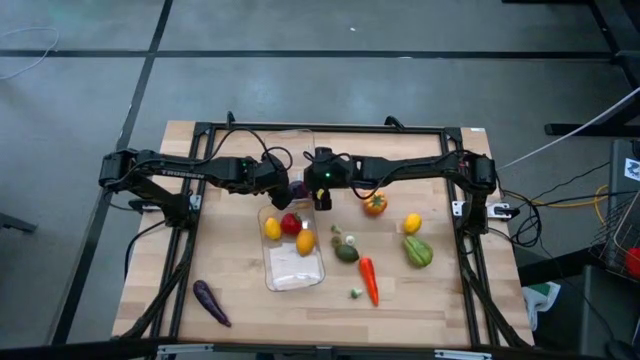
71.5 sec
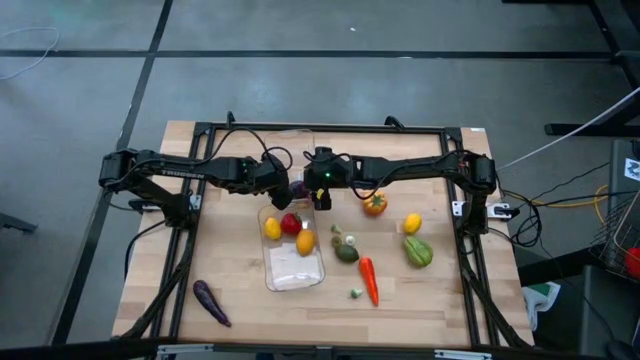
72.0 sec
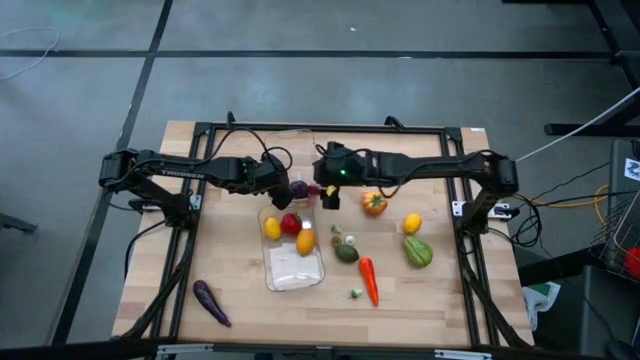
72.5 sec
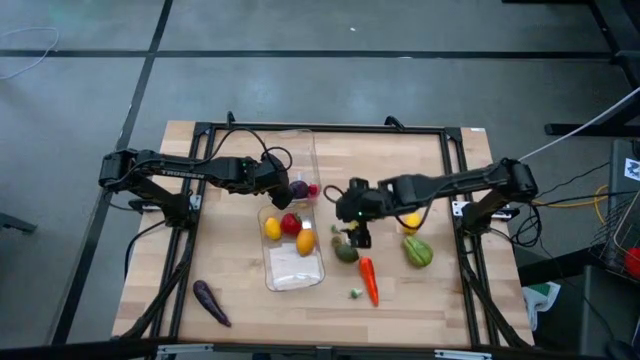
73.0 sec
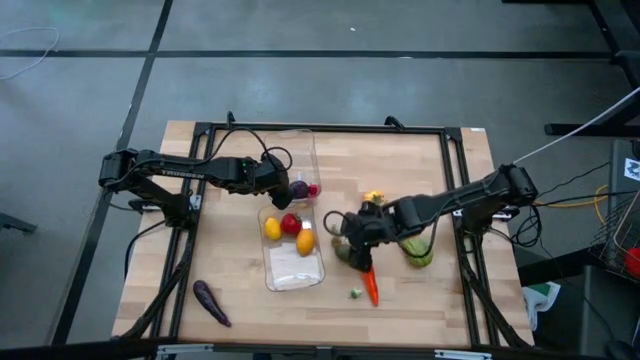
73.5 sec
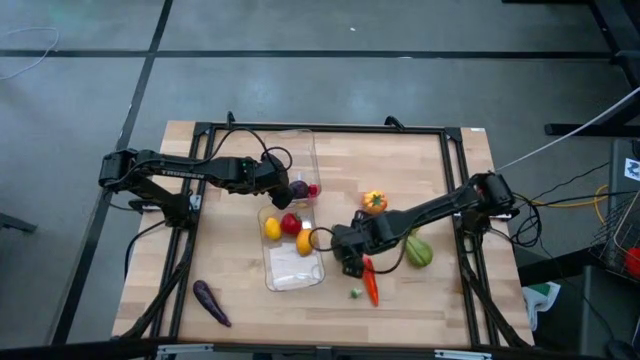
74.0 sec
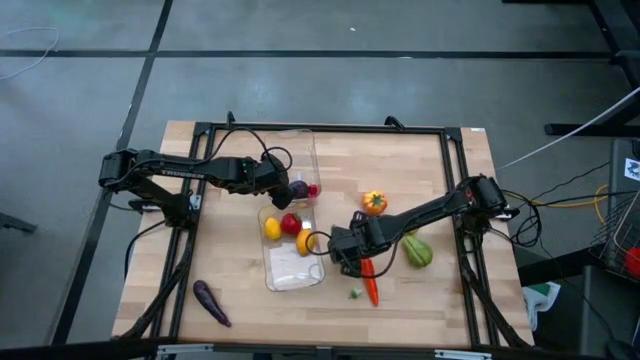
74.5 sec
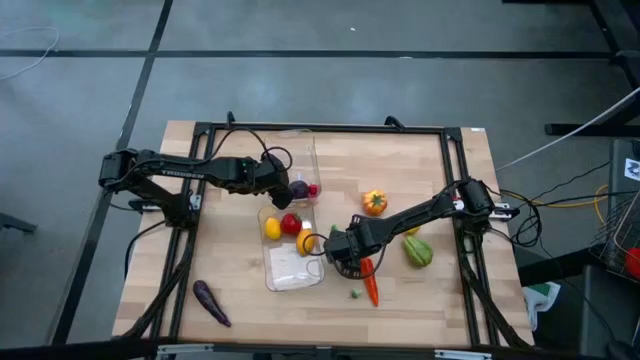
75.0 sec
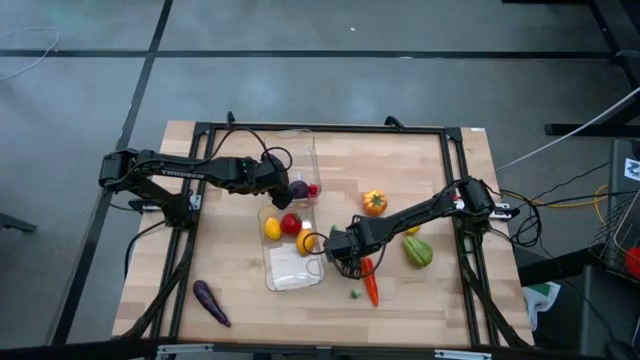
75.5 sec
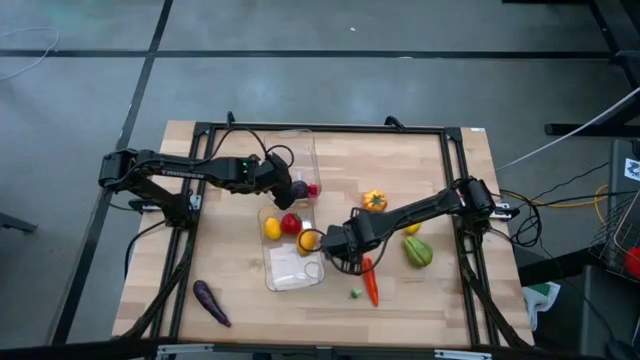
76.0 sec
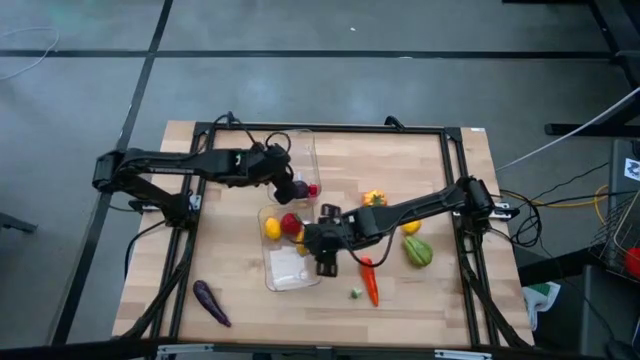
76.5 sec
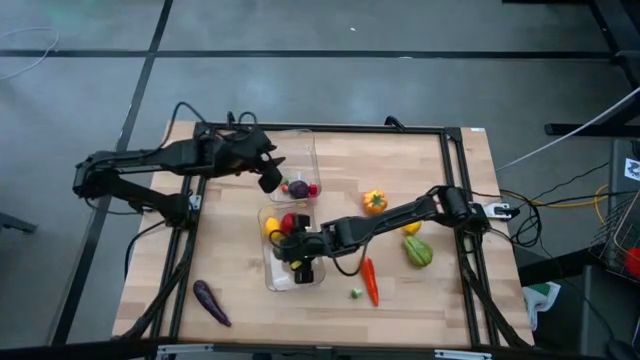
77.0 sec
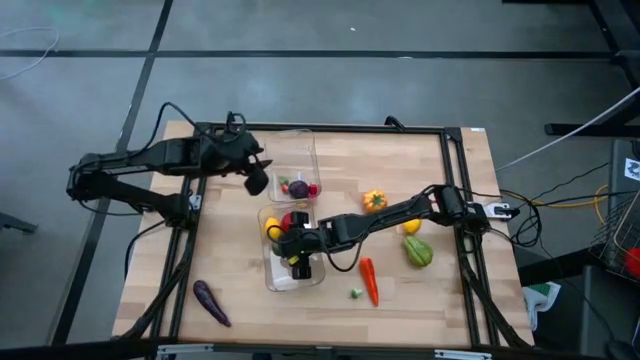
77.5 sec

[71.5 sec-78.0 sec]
Task: Sort produce into baskets
Put the green lime into the bottom transparent bin

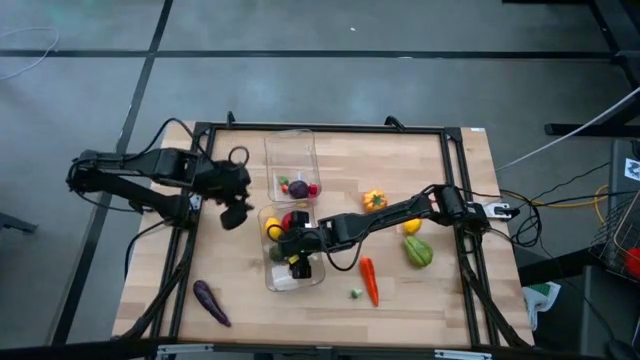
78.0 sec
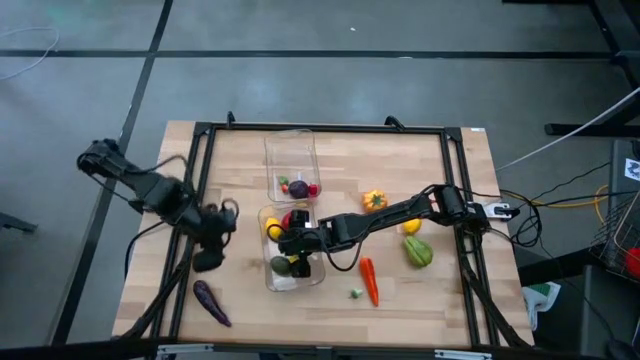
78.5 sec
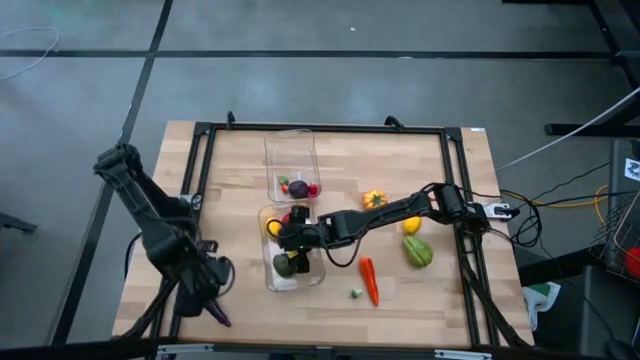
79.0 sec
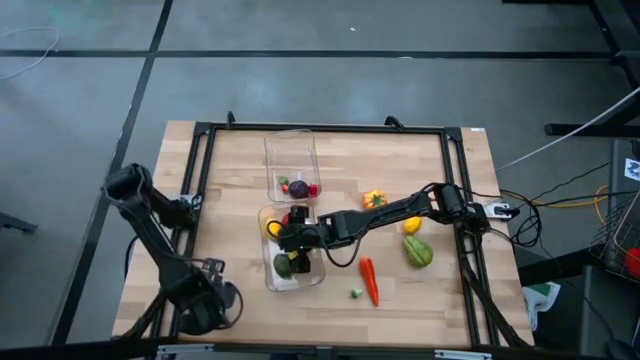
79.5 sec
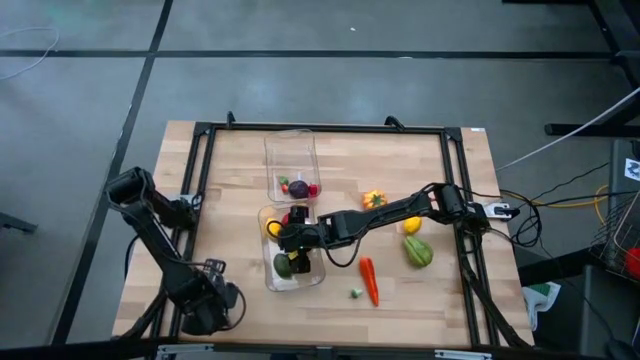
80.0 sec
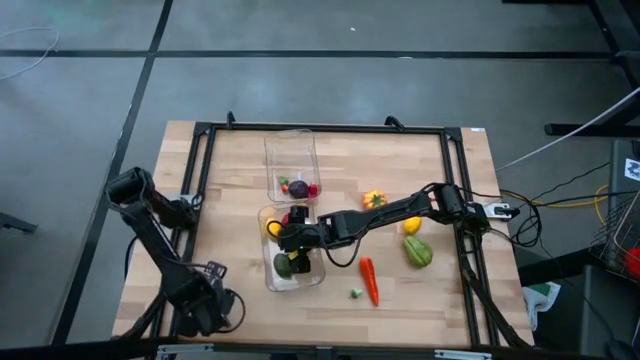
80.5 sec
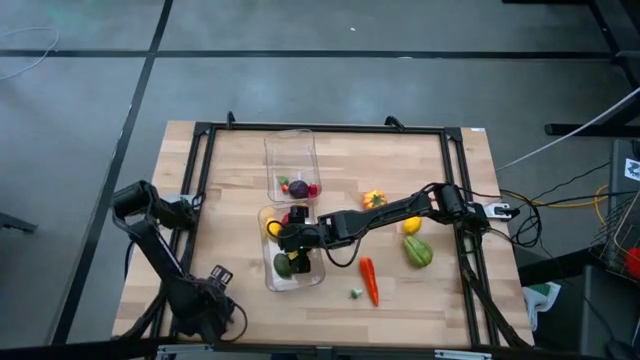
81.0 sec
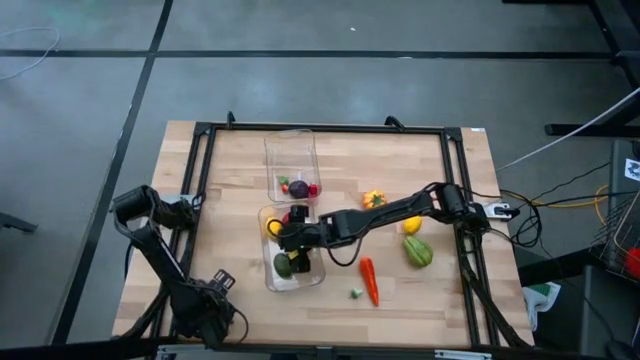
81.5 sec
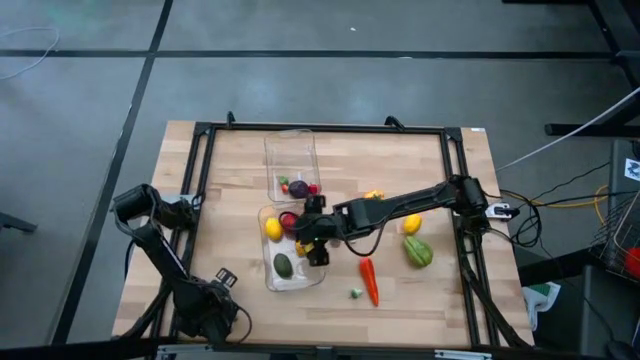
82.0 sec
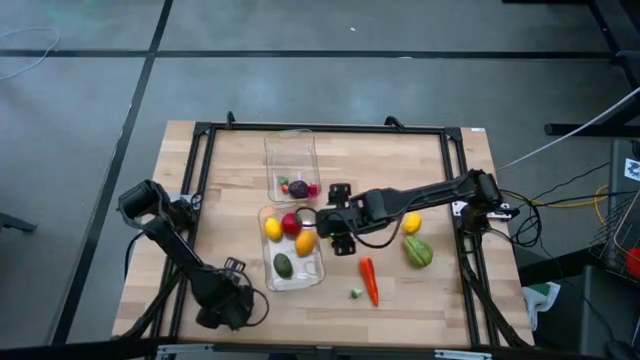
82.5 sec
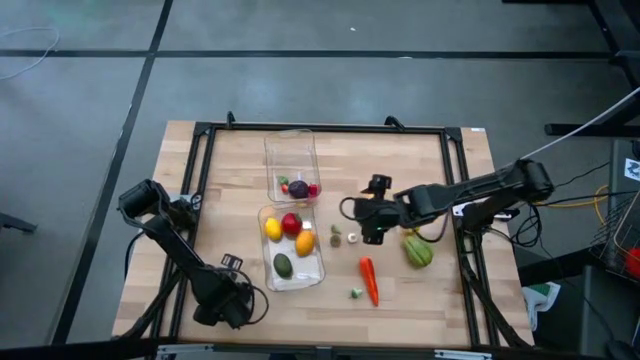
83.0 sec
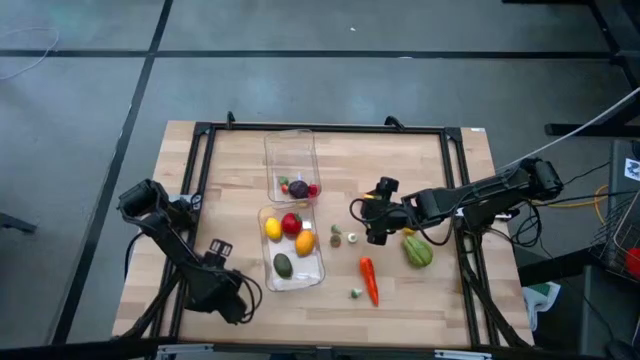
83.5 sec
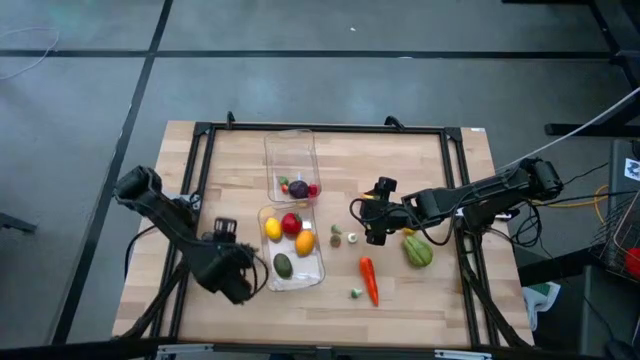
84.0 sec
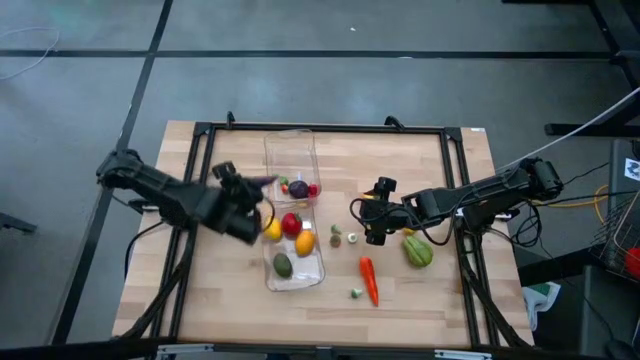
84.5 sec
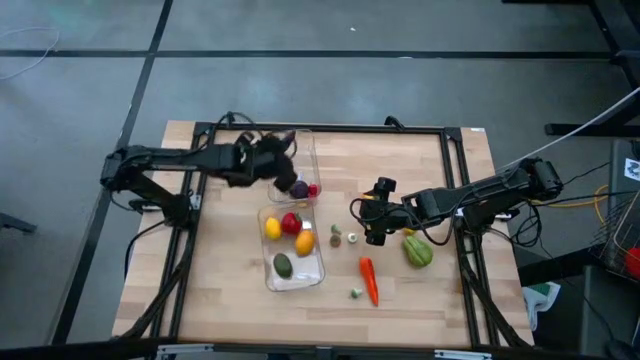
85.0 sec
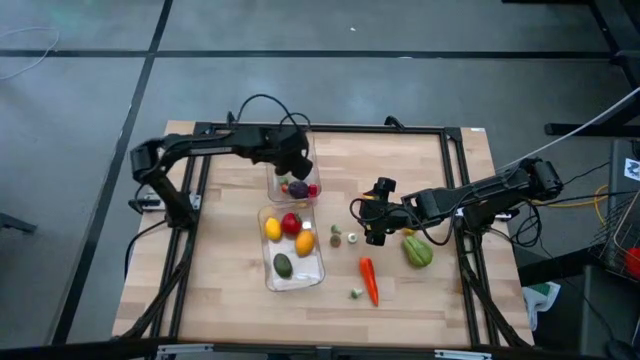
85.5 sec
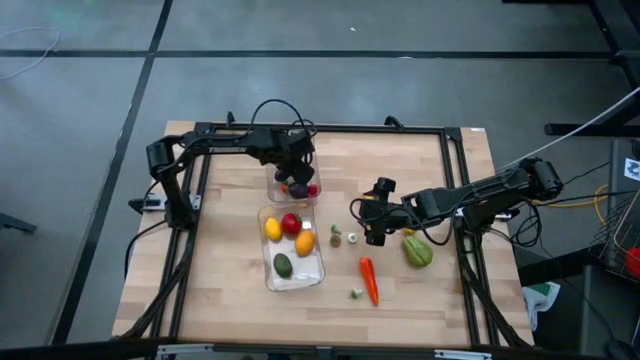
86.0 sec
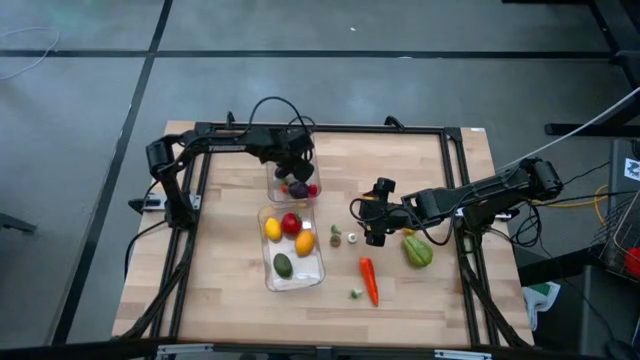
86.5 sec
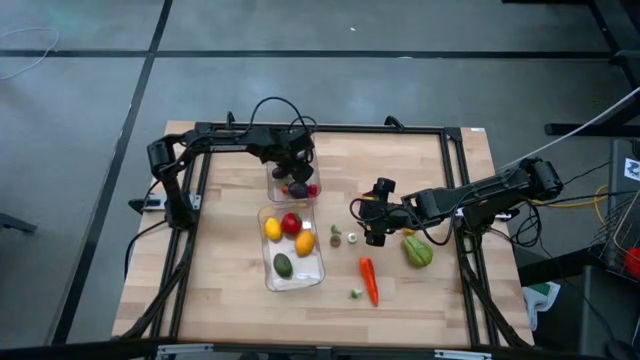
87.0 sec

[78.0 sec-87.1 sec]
Put the purple eggplant into the top transparent bin

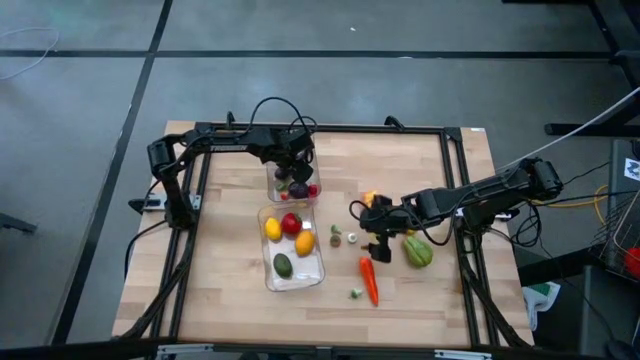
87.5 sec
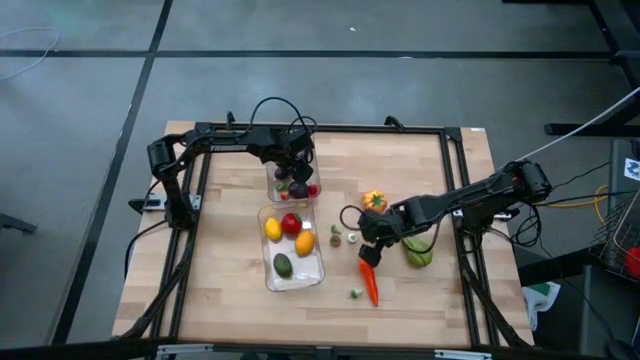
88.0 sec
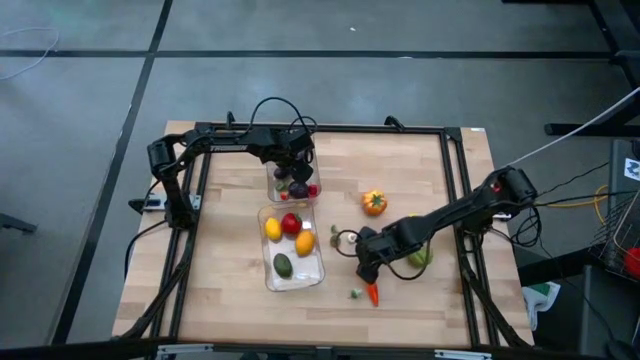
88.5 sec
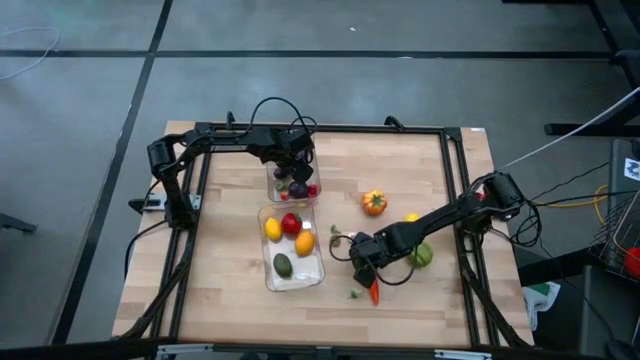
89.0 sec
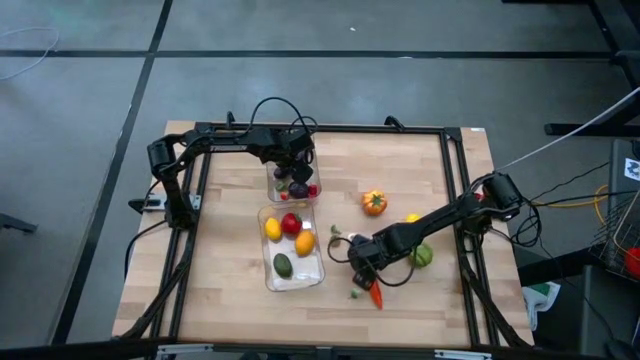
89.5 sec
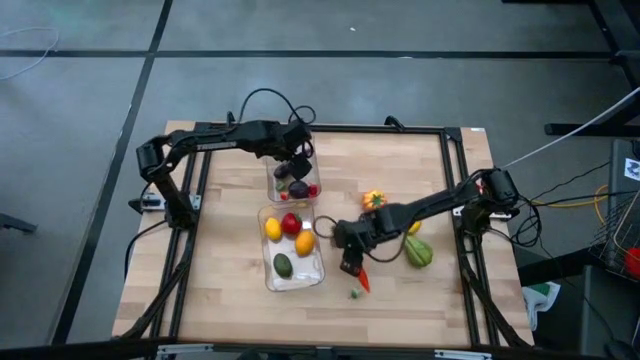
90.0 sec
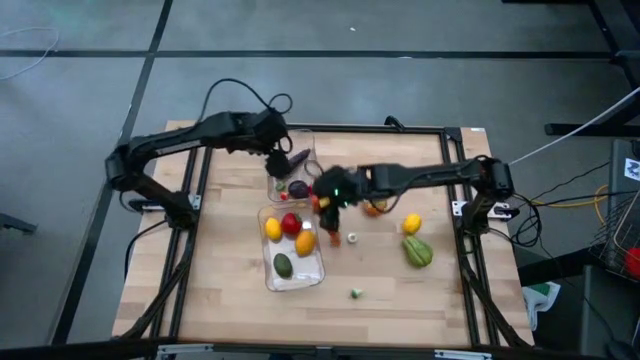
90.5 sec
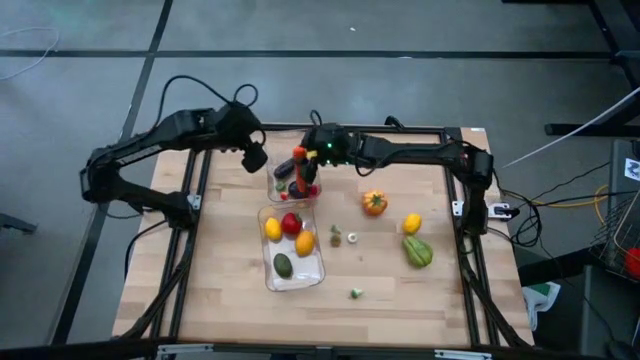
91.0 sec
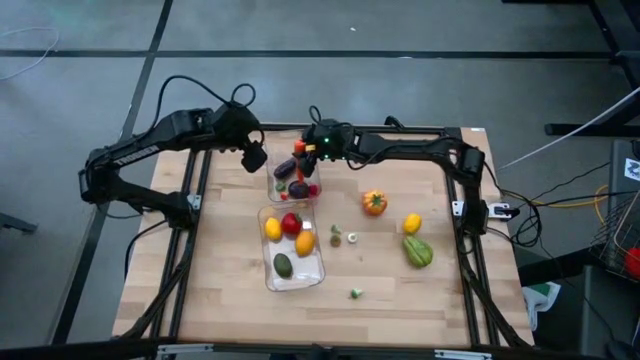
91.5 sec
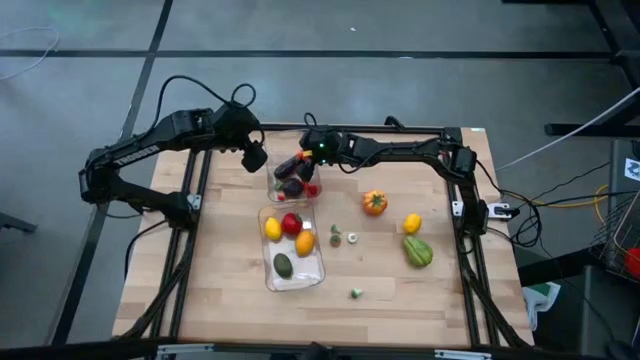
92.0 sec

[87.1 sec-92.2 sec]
Put the orange carrot into the top transparent bin
